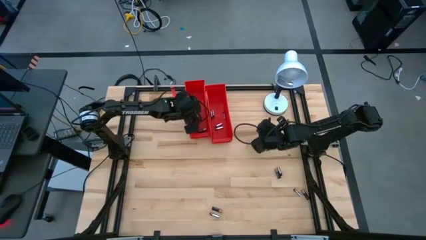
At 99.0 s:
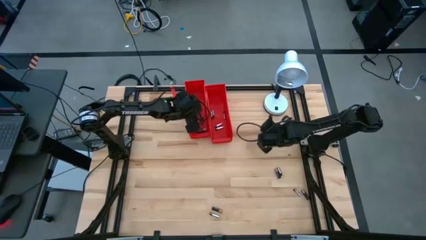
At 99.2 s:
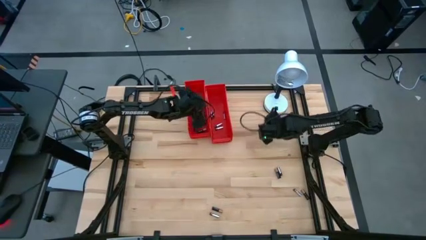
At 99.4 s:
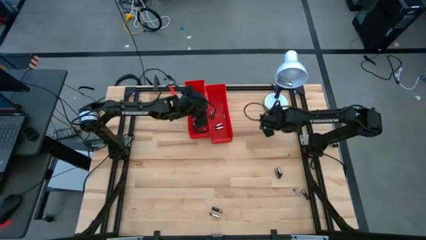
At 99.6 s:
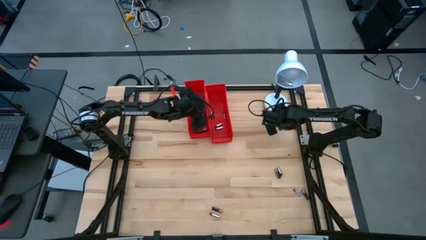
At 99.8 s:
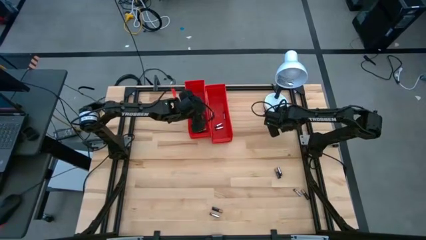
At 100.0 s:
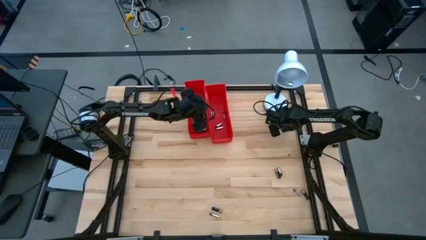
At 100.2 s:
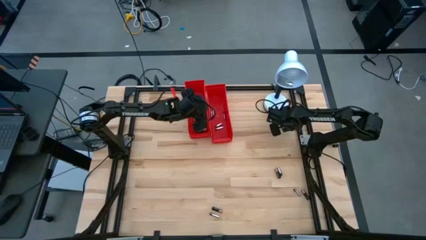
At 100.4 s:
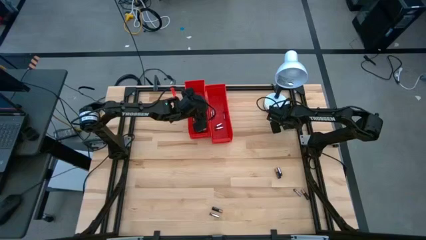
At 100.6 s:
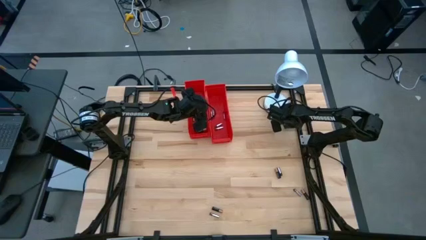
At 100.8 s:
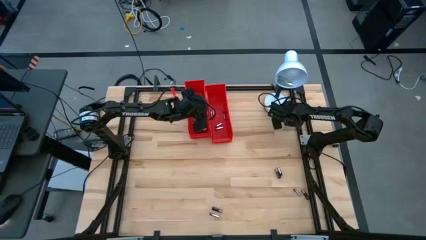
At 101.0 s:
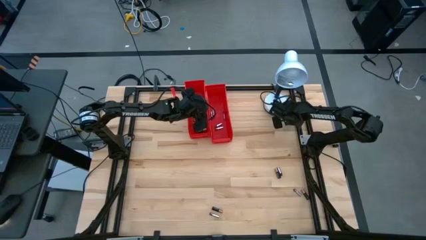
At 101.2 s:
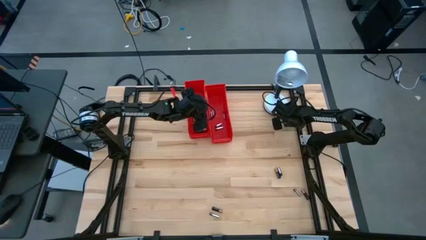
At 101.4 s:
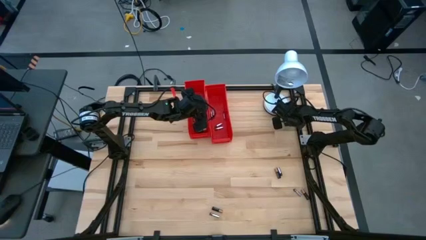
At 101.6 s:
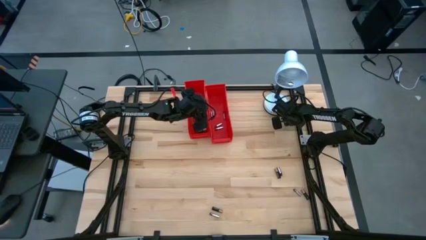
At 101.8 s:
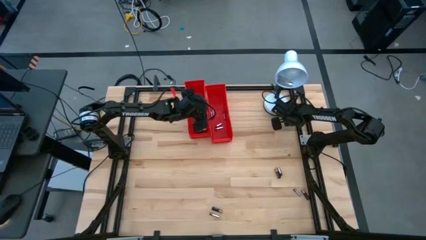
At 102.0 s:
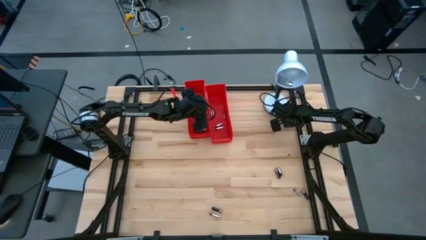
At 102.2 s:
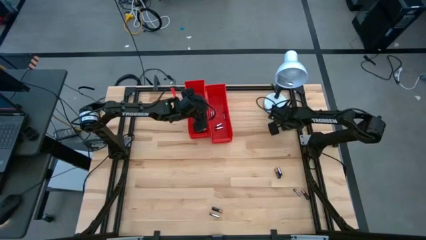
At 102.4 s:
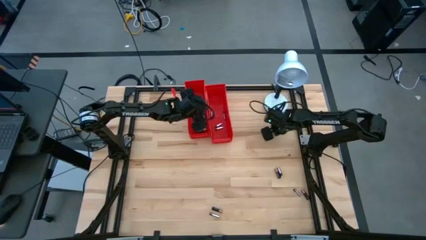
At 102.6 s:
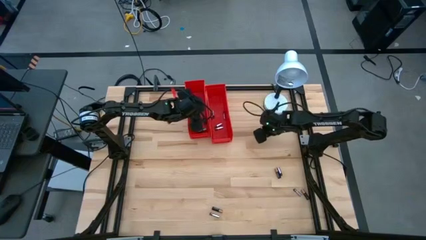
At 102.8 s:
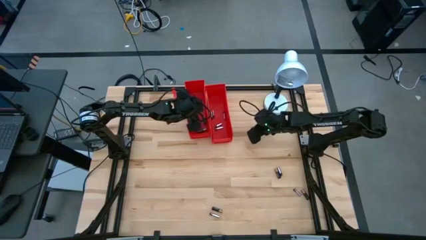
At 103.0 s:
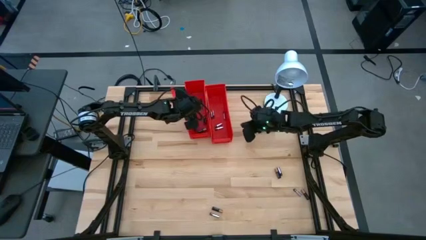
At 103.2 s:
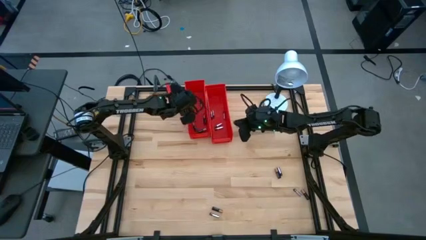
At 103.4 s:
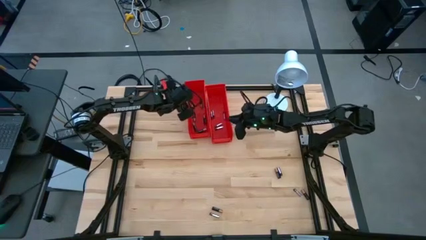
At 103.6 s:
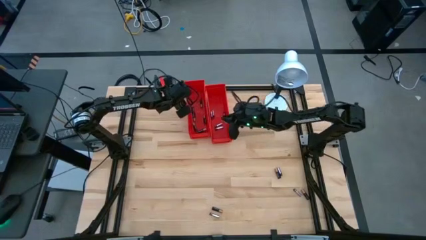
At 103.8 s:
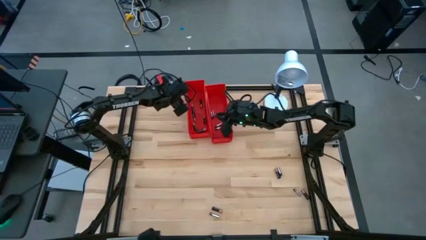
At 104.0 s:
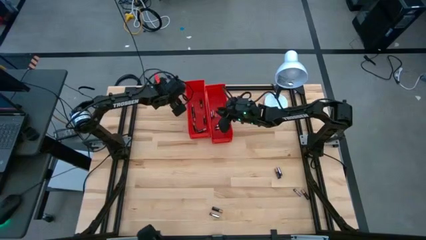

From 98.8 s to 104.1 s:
Task: Sort batteries
Put the silver battery into the right red bin

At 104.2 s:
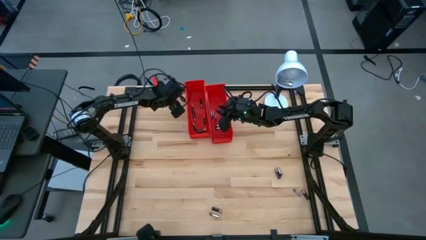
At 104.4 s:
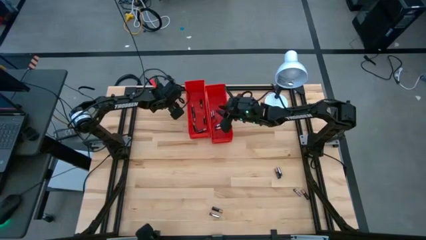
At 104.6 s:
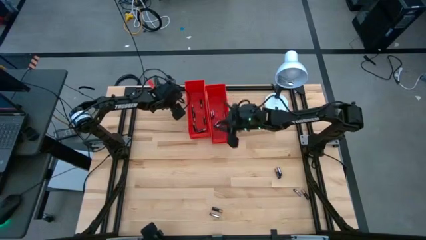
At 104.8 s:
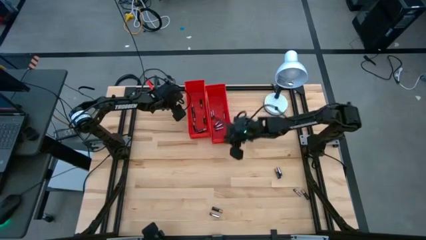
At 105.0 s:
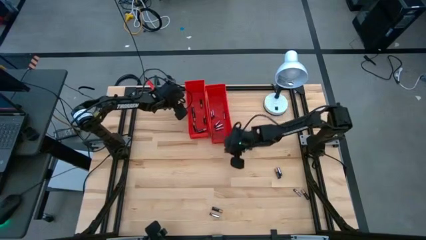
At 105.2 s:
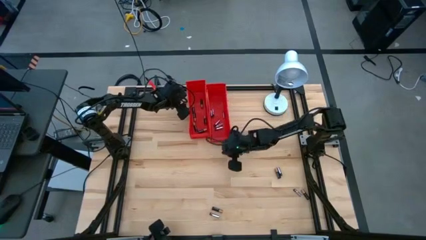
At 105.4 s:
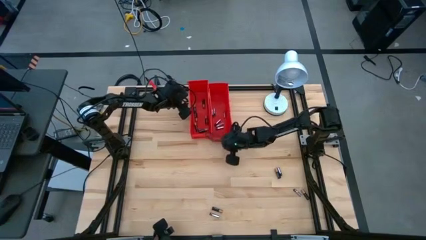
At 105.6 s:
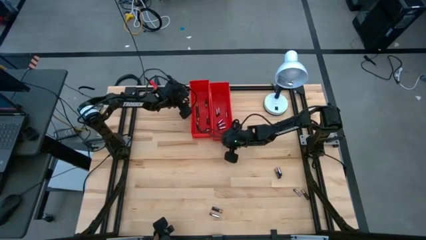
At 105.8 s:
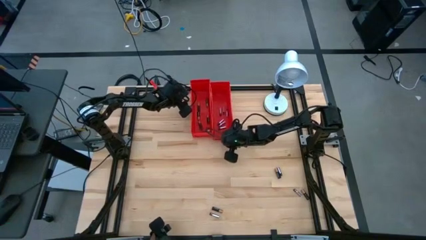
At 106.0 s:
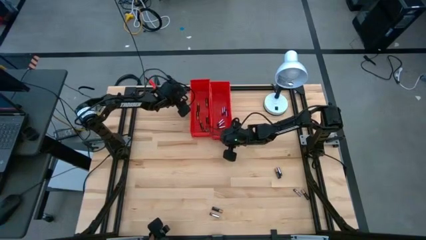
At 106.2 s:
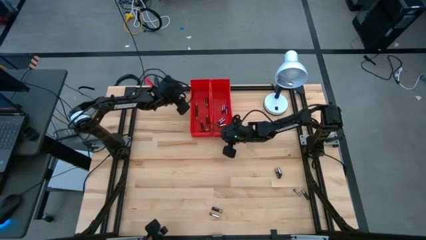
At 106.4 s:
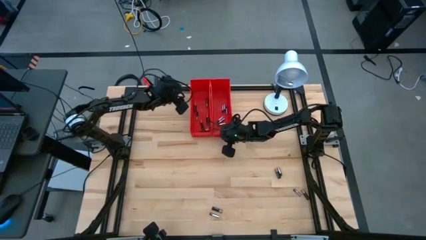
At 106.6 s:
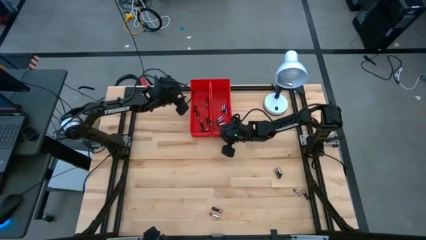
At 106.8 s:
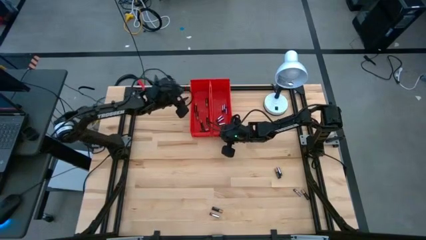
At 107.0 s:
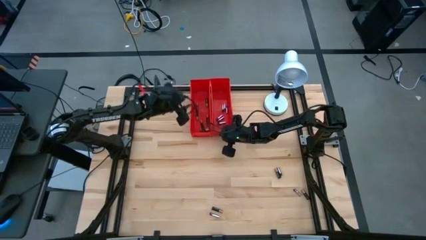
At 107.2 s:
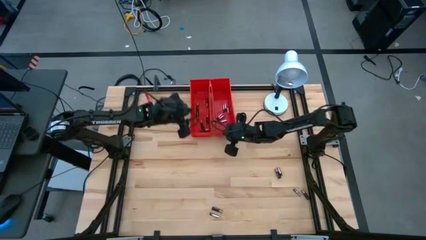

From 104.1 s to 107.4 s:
Adjust the red bins

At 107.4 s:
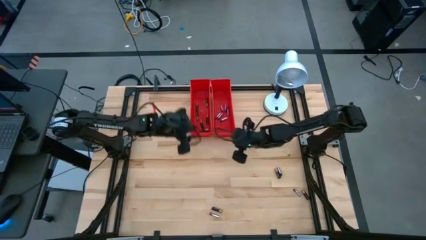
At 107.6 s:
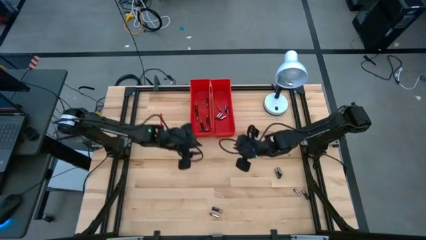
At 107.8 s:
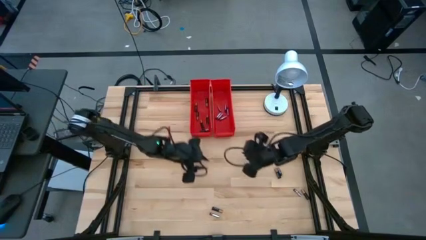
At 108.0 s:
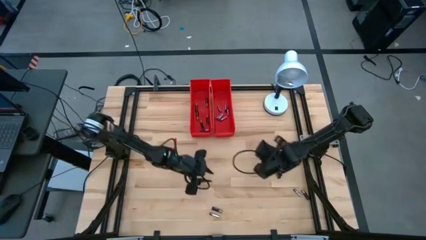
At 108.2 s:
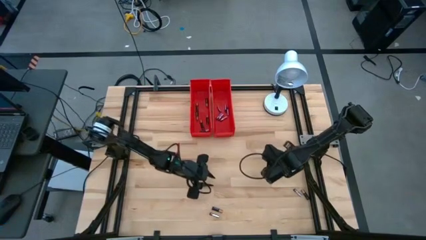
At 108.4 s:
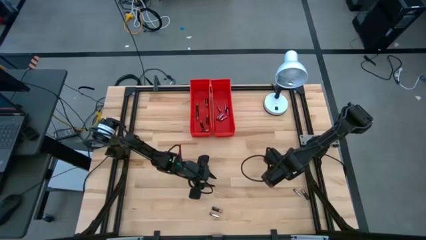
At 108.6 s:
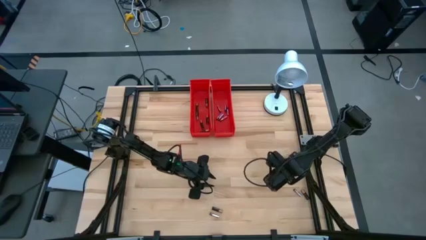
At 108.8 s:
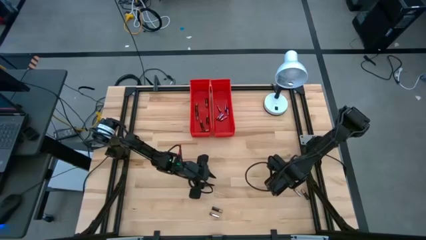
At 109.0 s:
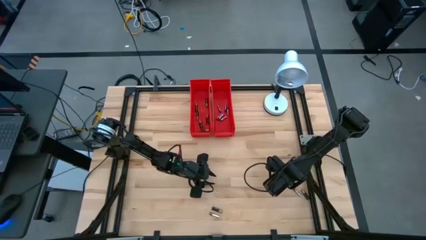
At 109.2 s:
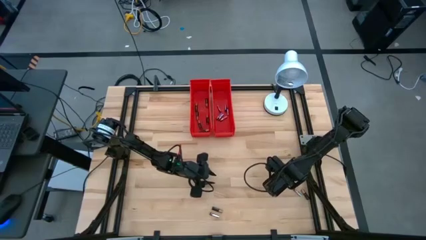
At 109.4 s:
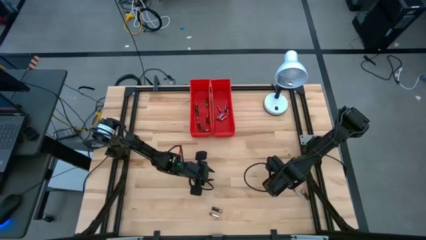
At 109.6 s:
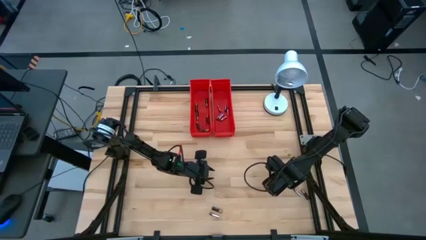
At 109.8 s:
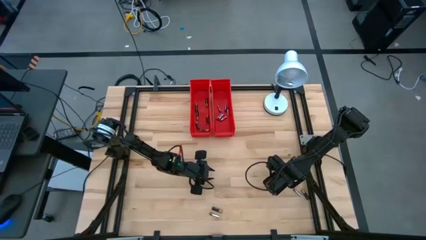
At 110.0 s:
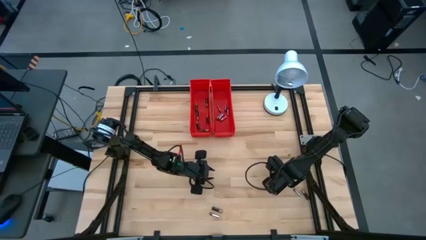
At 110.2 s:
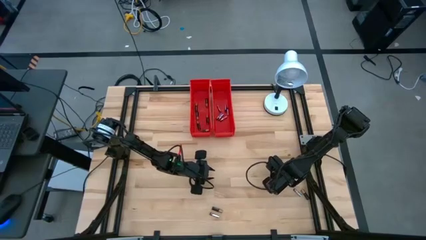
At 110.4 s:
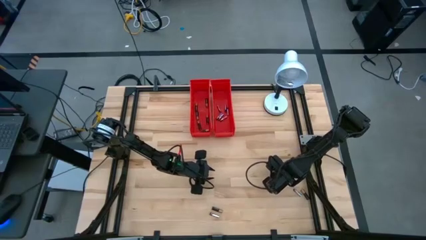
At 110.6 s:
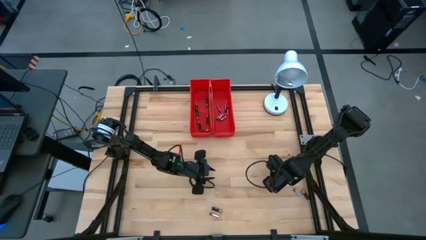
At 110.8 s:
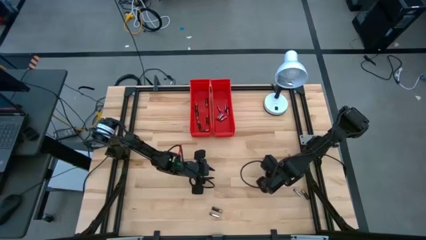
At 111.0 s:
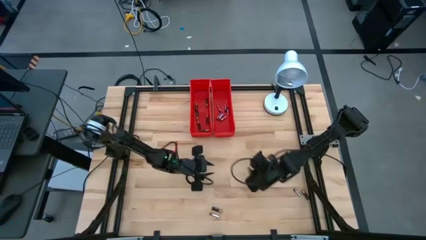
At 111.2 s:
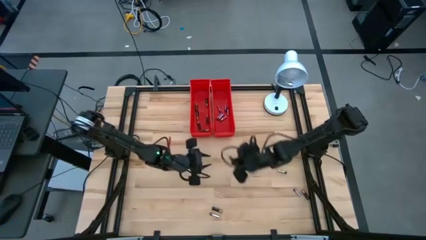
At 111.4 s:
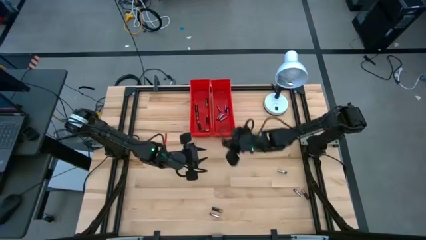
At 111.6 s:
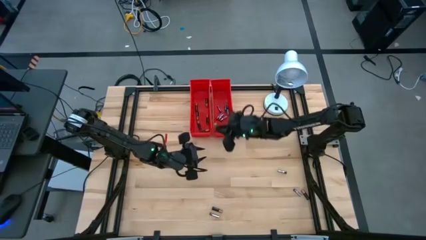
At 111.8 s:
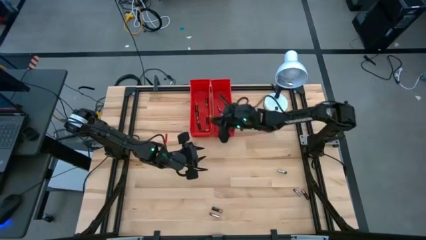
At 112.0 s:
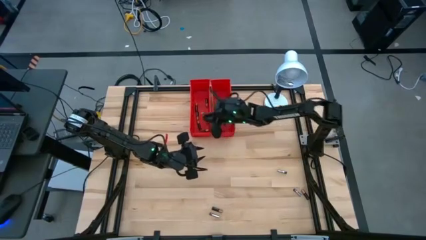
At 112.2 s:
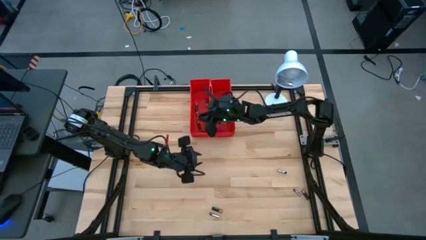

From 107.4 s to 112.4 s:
Put the black battery into the left red bin

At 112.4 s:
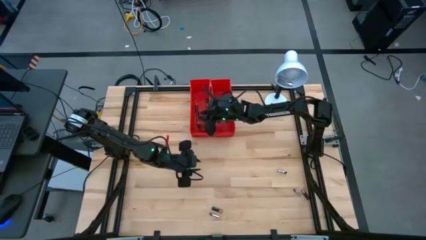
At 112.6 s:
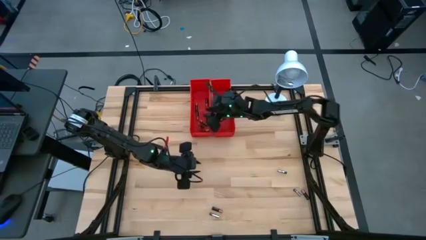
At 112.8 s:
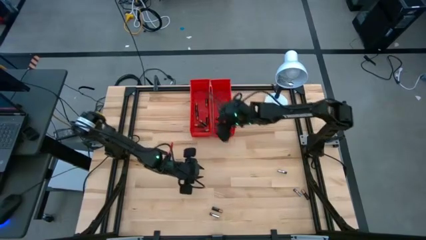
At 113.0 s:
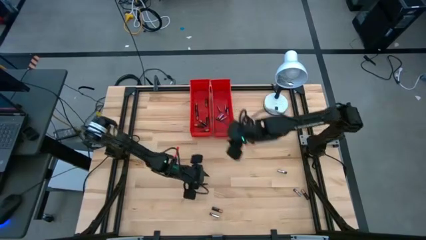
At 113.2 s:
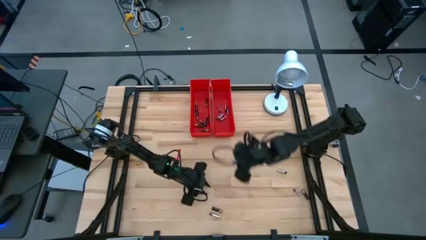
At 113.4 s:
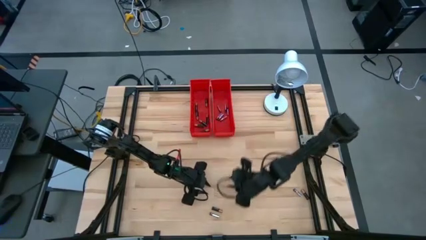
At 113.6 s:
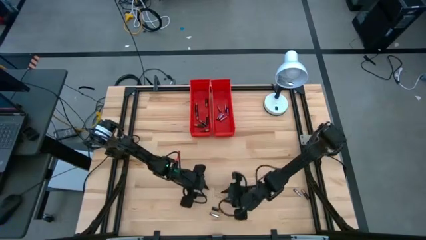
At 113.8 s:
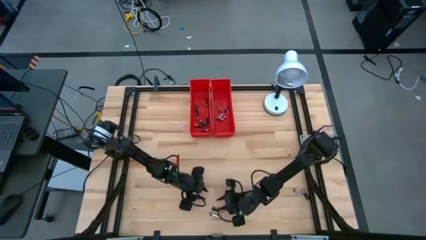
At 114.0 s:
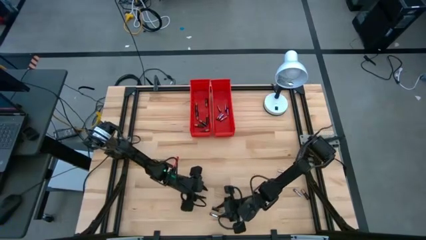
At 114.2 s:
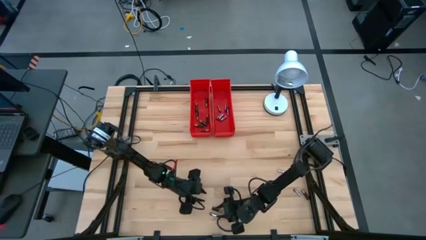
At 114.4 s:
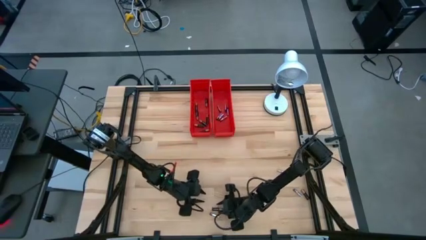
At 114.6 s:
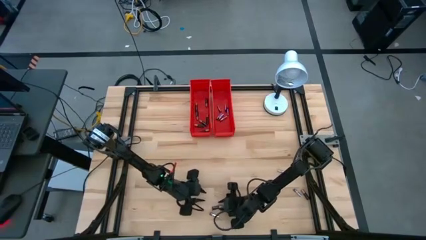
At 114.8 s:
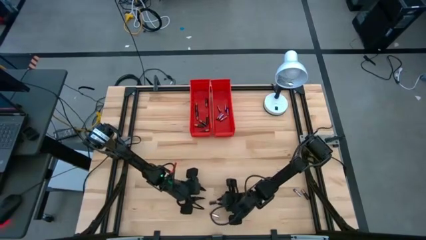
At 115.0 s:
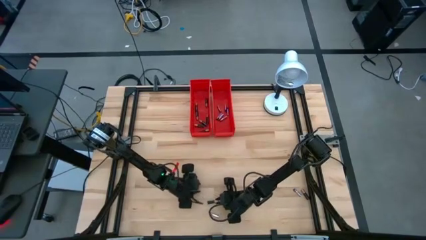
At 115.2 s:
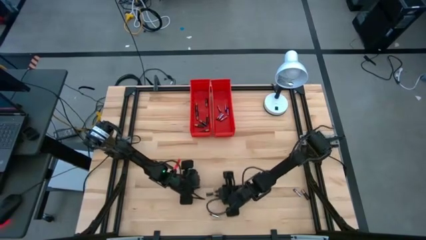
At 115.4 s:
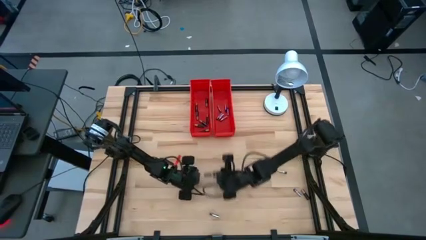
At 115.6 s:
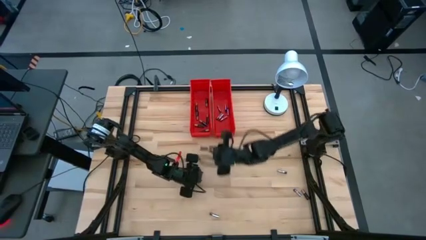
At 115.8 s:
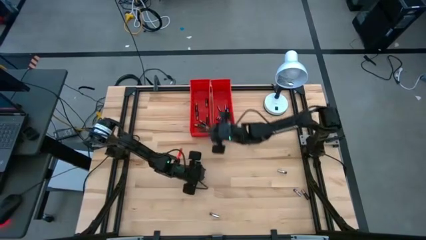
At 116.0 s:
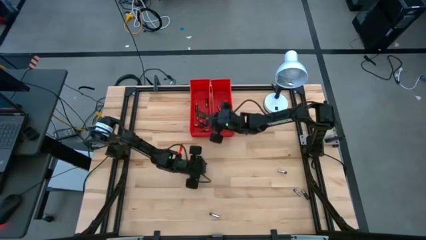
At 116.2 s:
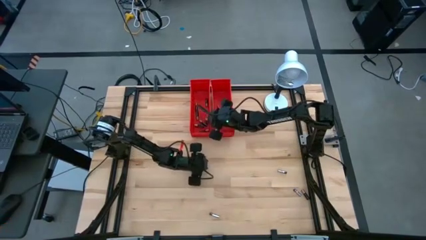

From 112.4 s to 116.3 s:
Put the black battery into the left red bin
